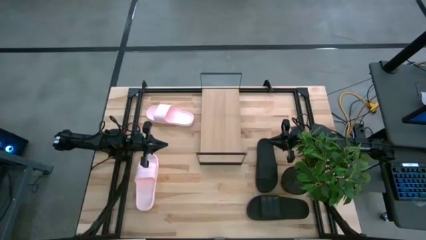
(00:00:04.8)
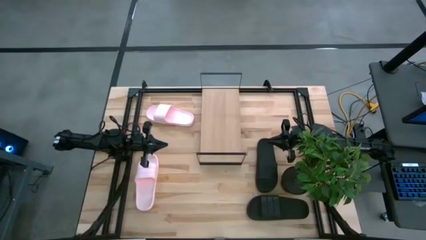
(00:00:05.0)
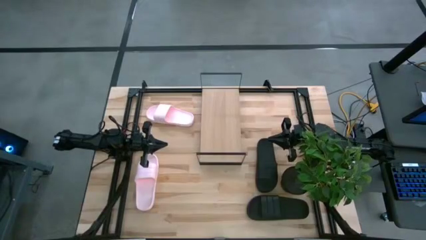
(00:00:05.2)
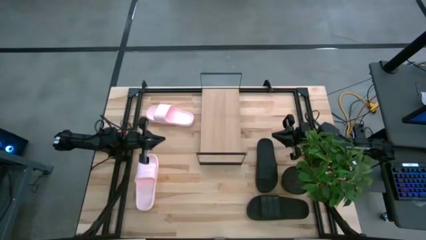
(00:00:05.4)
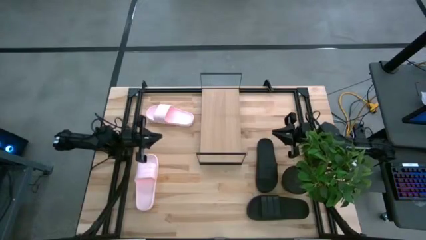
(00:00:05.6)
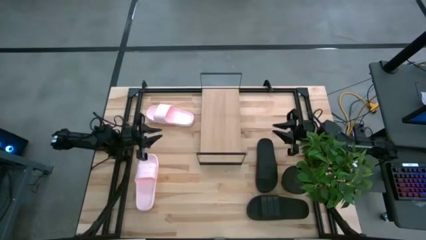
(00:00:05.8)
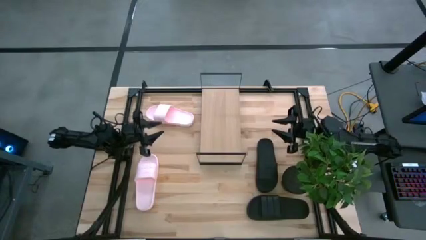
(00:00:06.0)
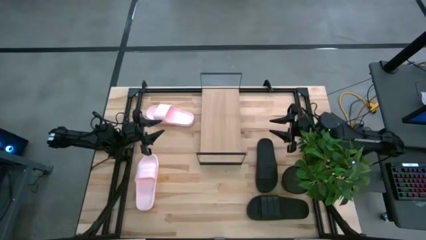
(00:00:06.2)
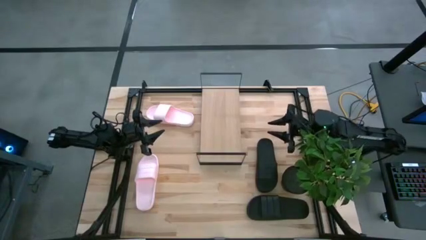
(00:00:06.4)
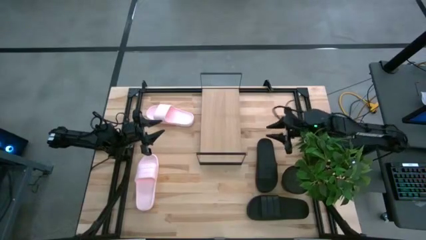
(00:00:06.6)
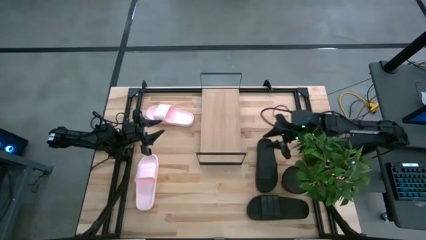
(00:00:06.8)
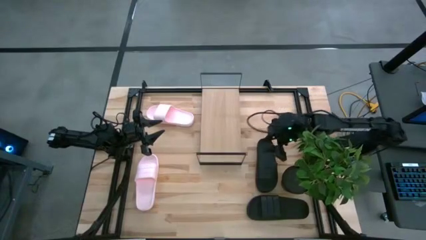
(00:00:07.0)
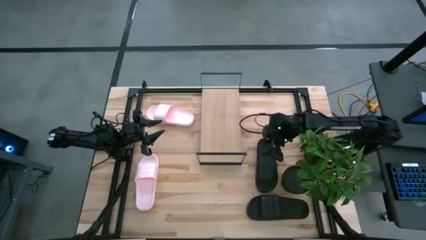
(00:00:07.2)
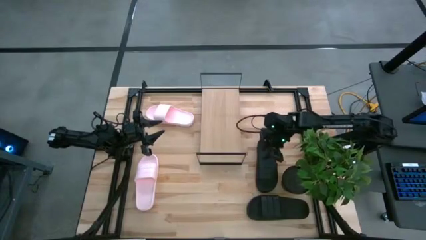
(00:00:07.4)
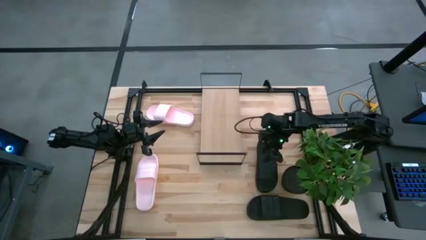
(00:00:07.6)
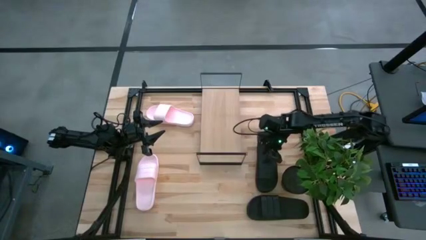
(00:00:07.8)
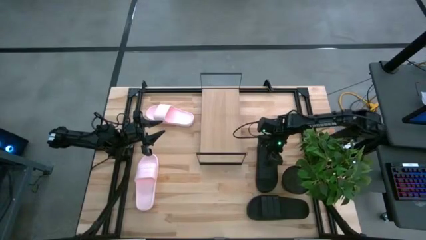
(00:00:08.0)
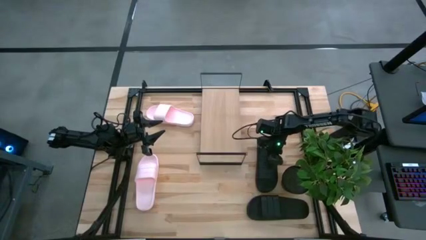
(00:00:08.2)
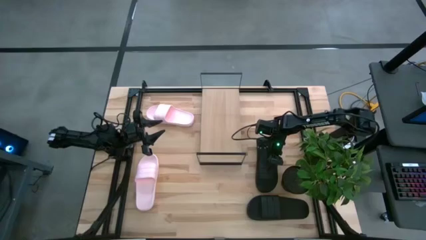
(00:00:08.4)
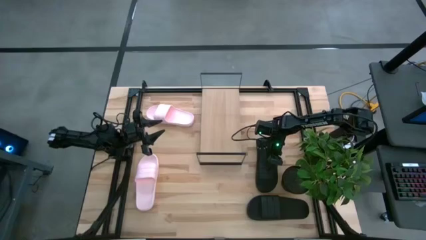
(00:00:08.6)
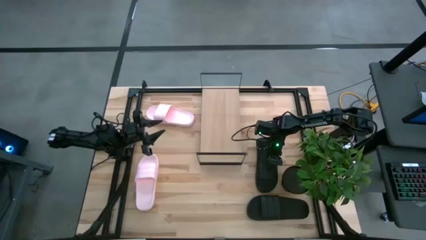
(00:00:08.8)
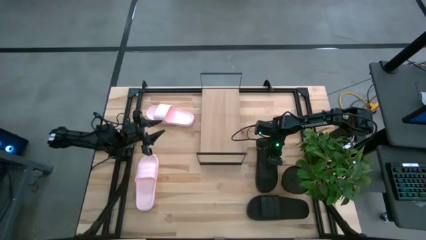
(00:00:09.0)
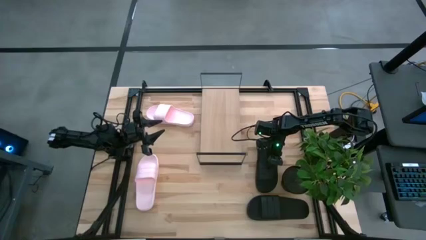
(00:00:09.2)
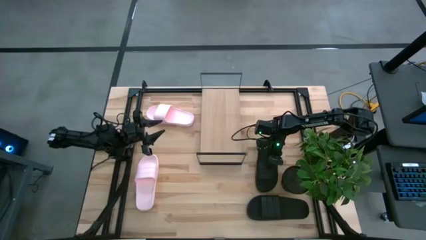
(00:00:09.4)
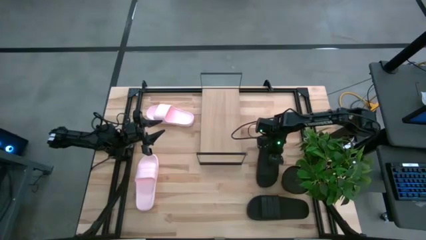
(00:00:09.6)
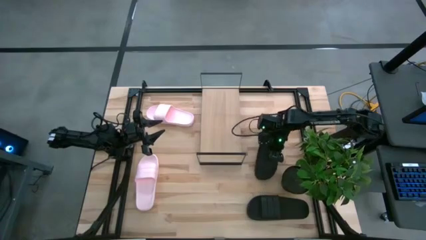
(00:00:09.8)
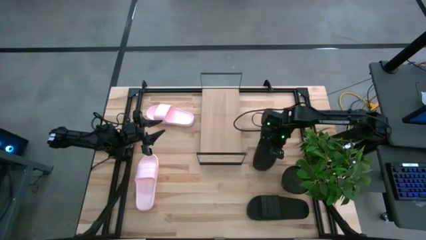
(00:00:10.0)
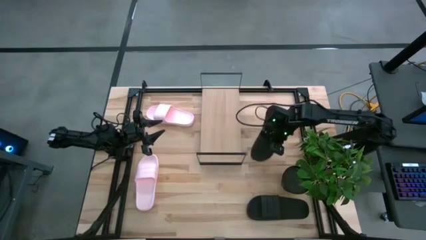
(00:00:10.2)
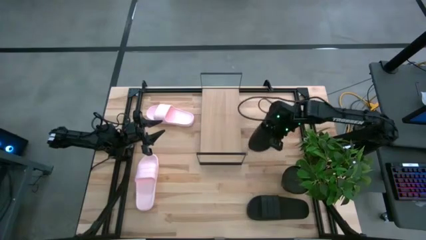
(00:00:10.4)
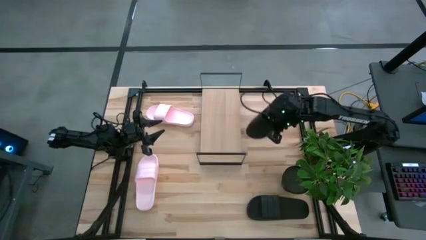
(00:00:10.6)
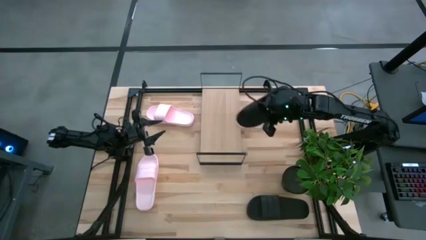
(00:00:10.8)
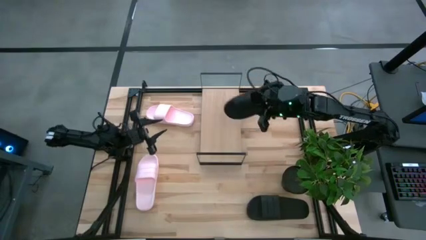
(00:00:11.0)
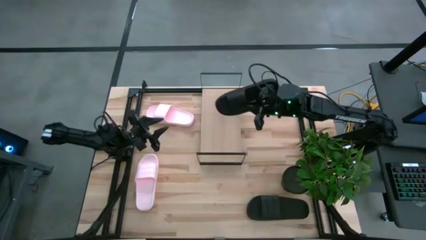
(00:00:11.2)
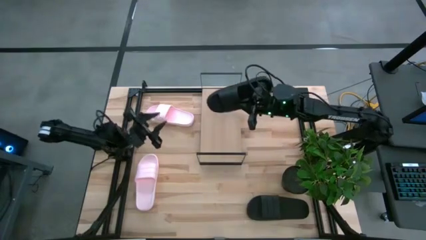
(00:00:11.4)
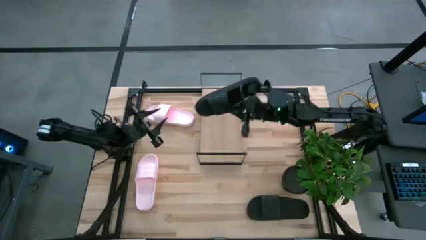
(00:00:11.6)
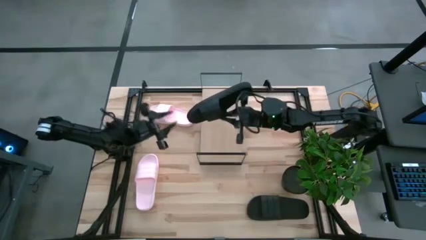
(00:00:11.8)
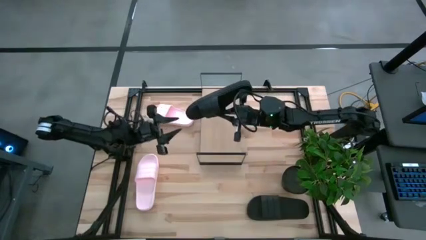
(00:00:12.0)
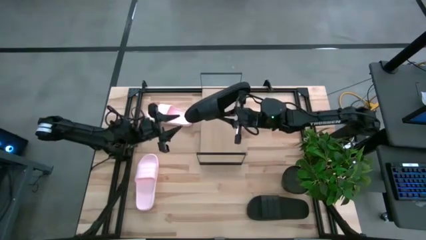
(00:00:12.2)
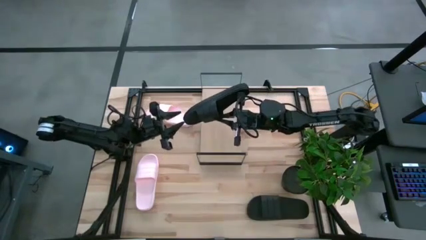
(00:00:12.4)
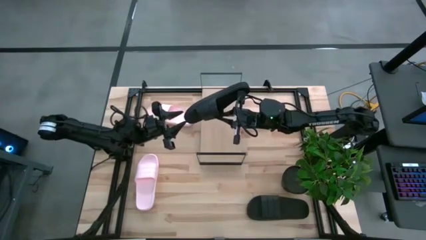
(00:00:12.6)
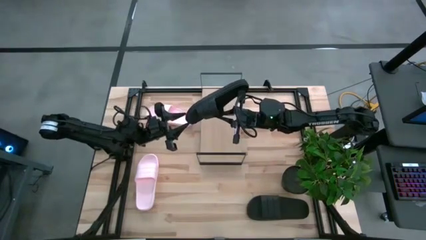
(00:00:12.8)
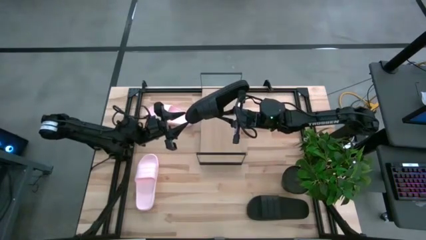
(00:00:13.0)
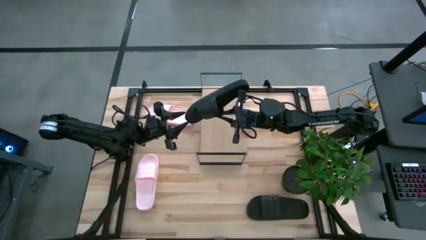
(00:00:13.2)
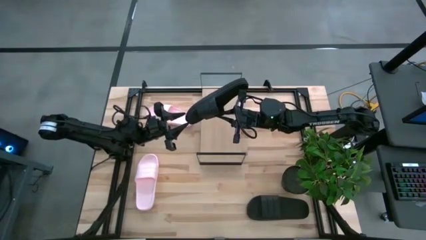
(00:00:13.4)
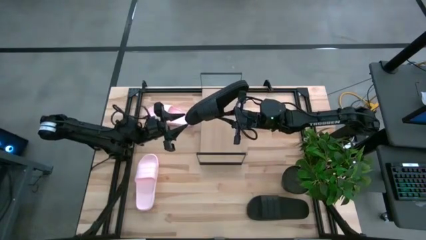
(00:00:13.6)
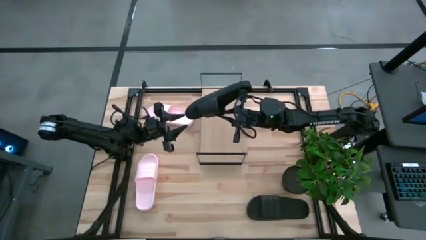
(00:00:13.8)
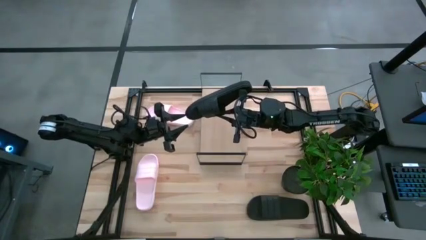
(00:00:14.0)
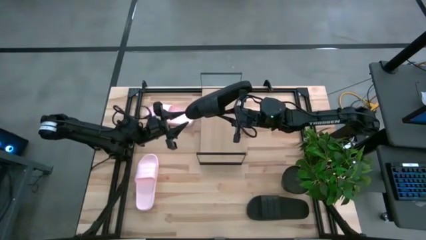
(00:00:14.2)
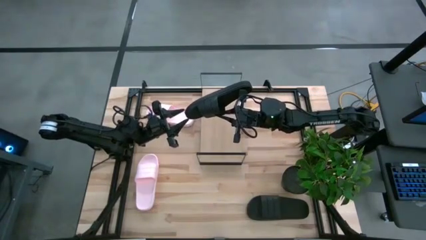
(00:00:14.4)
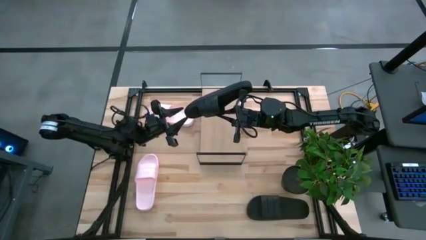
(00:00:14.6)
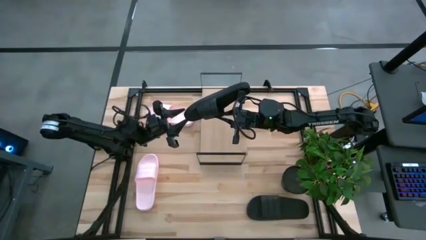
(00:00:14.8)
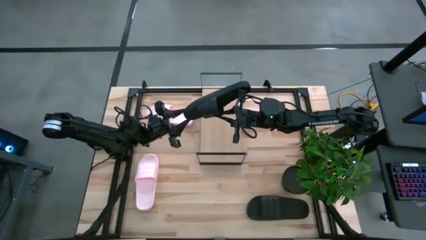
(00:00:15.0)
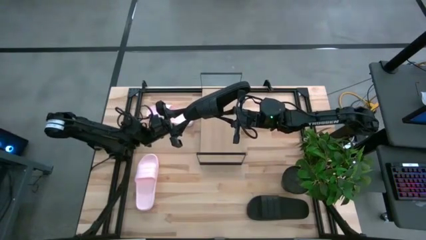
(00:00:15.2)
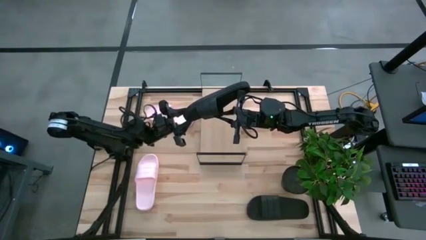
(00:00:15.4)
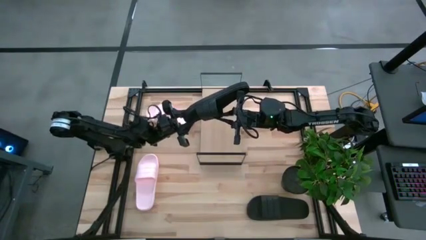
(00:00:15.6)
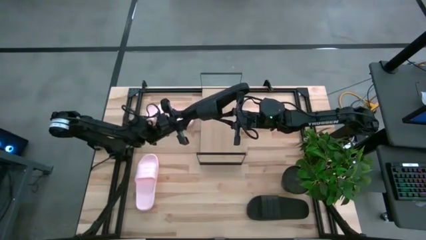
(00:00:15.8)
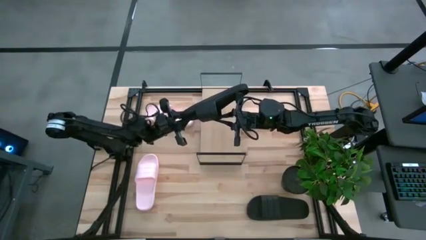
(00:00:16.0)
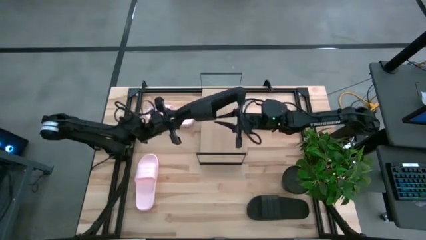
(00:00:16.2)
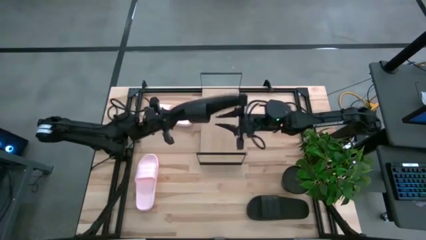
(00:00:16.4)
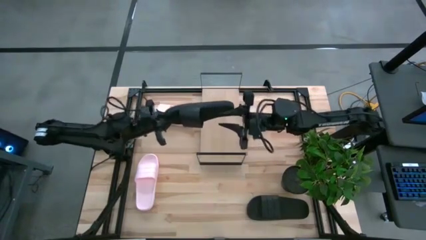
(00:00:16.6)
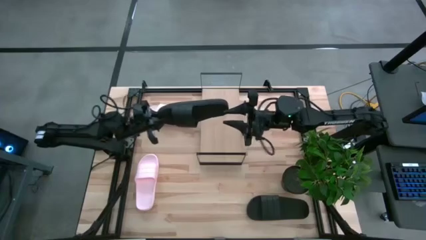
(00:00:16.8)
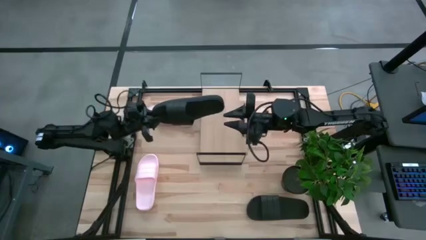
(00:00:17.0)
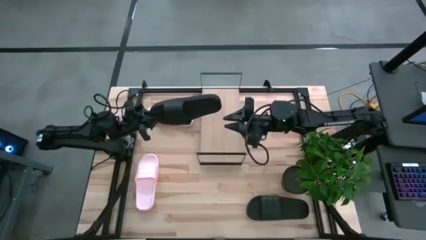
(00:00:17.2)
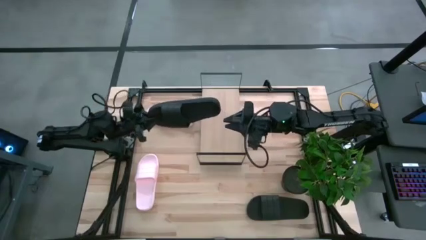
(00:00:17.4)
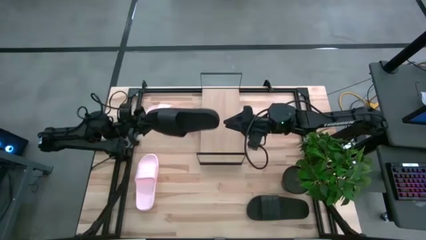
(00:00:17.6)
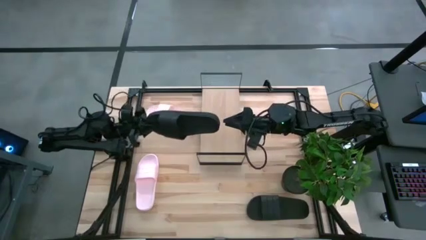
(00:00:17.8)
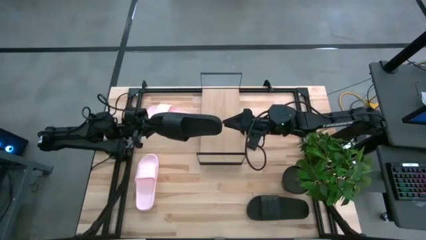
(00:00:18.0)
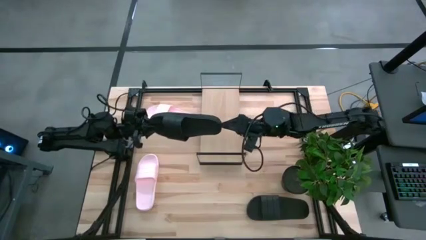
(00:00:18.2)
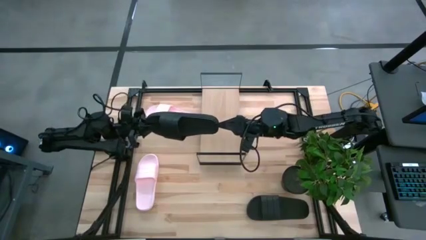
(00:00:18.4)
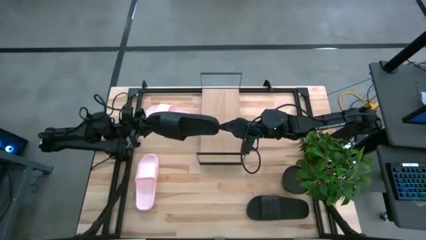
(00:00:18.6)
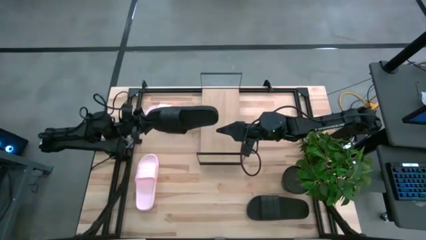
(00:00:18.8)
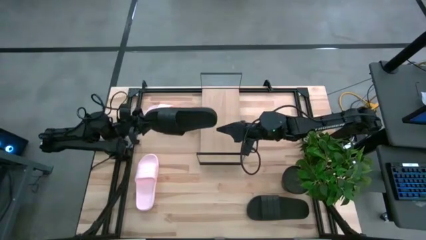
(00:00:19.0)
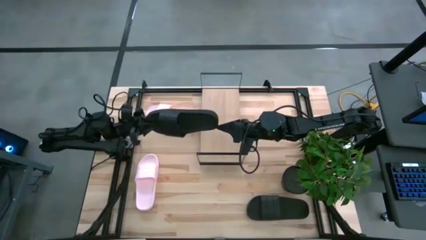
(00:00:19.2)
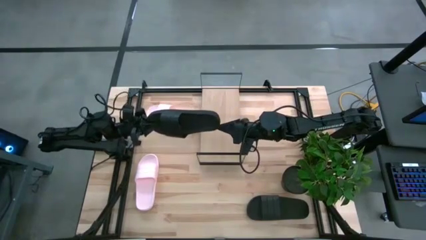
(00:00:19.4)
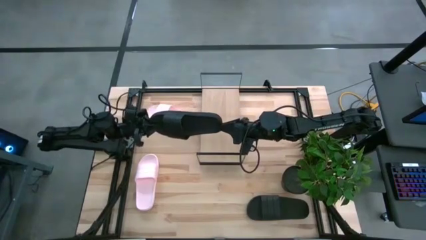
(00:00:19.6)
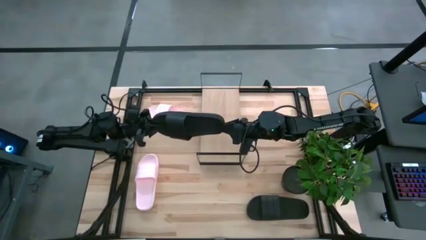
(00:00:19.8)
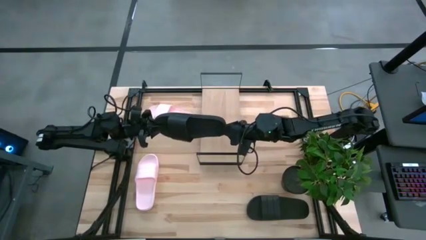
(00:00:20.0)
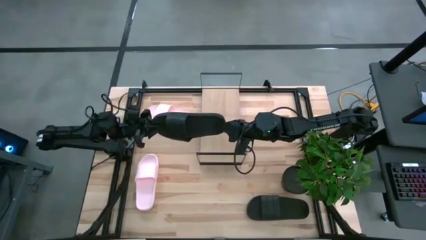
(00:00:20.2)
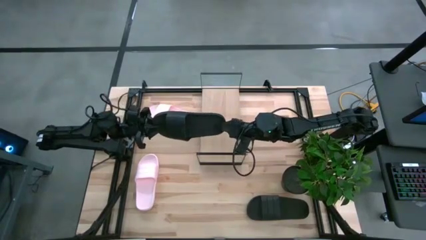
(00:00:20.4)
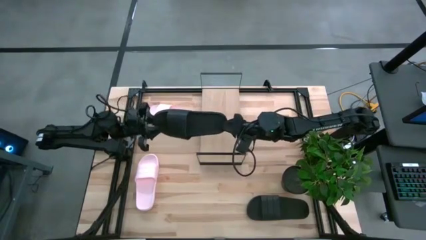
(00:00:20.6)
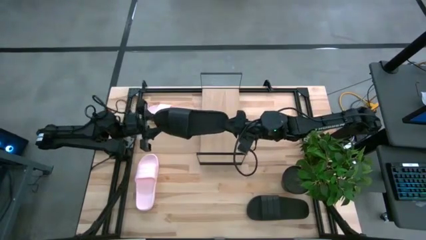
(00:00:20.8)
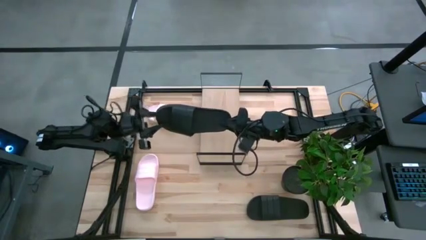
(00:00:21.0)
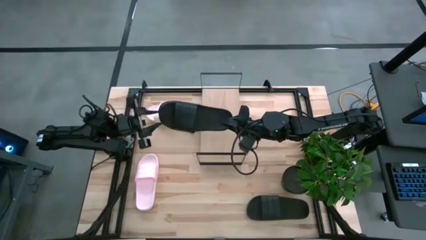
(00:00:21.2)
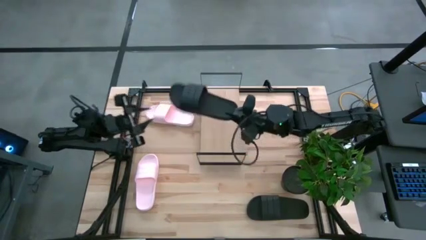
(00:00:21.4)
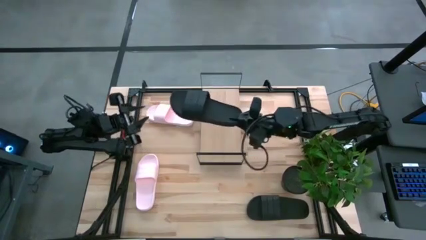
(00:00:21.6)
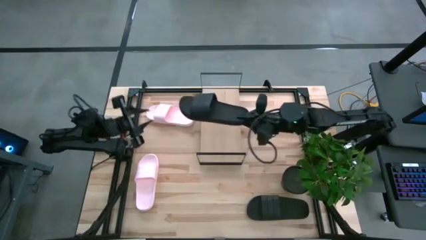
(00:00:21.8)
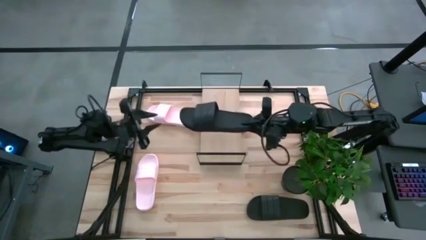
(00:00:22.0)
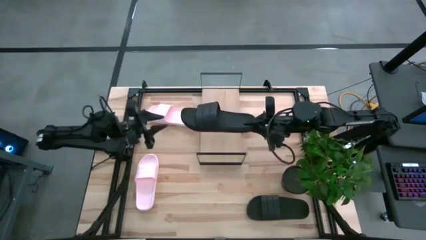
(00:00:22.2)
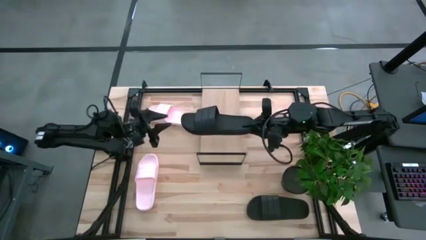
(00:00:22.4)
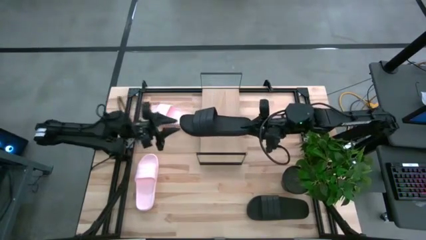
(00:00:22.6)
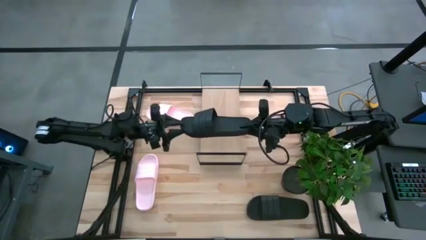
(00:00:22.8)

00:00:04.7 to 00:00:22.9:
Task: Pick and place slides into the shelf
Put the top black slides on the shelf
